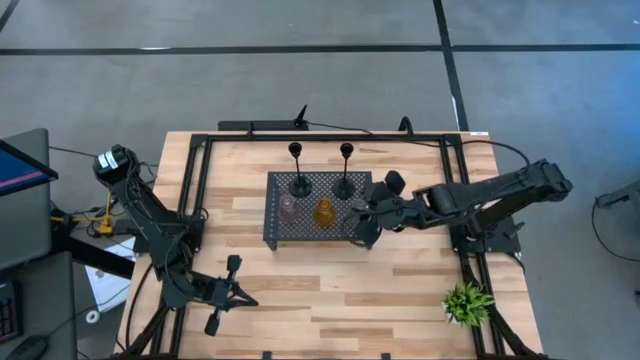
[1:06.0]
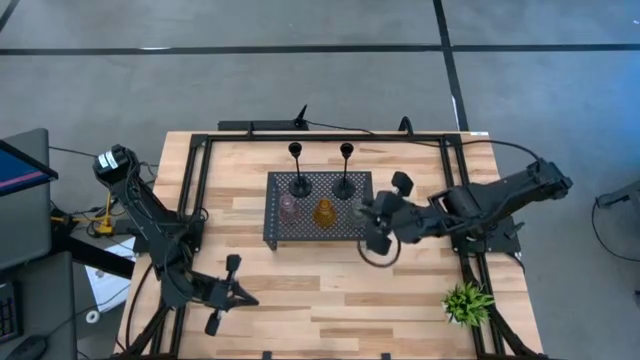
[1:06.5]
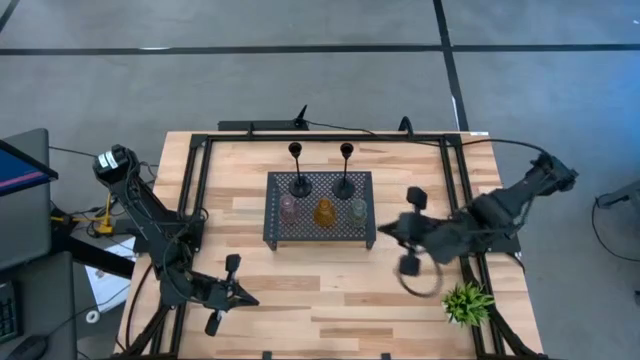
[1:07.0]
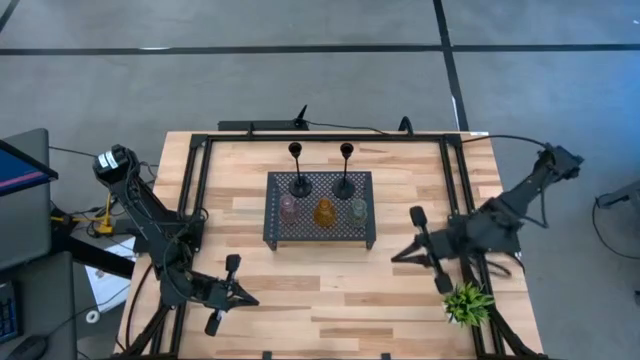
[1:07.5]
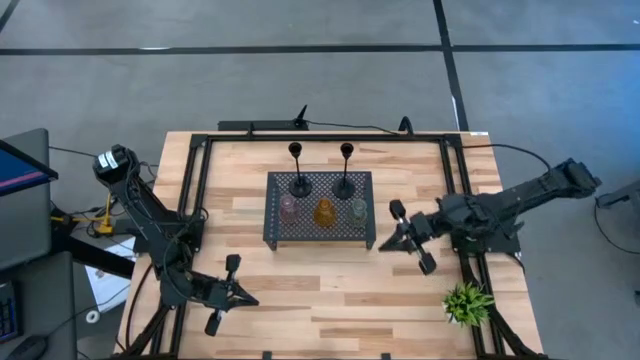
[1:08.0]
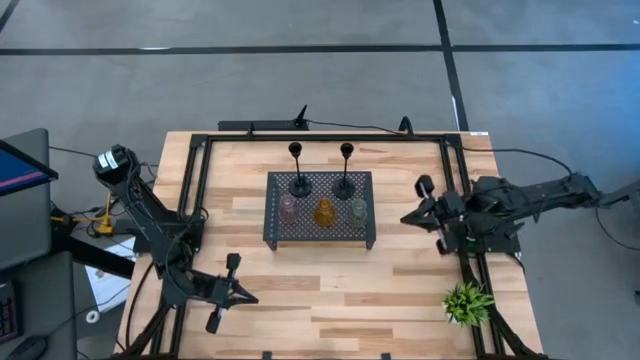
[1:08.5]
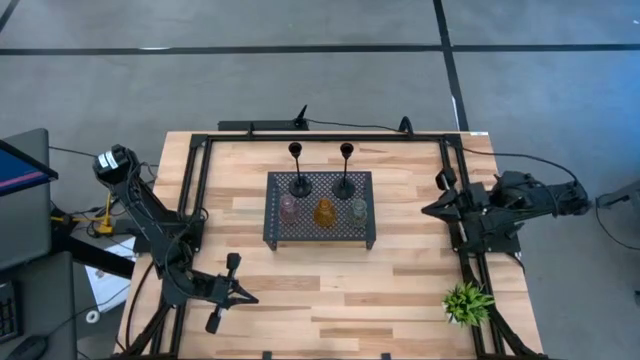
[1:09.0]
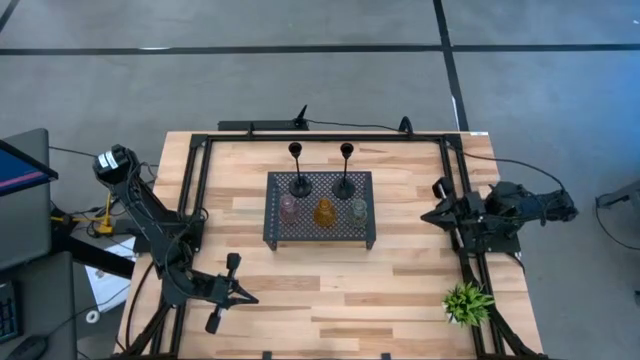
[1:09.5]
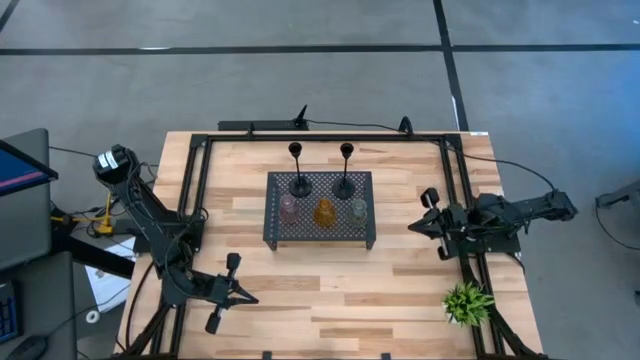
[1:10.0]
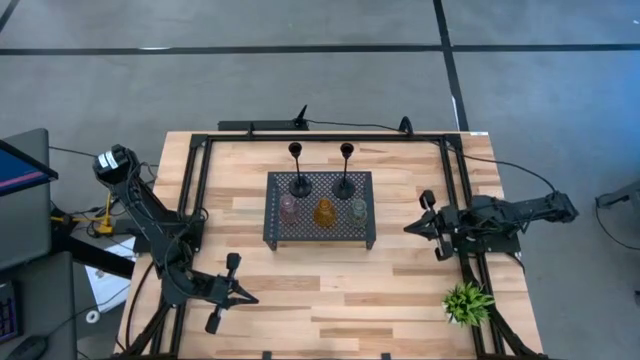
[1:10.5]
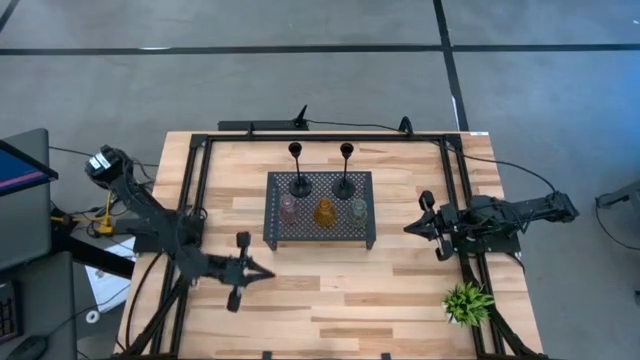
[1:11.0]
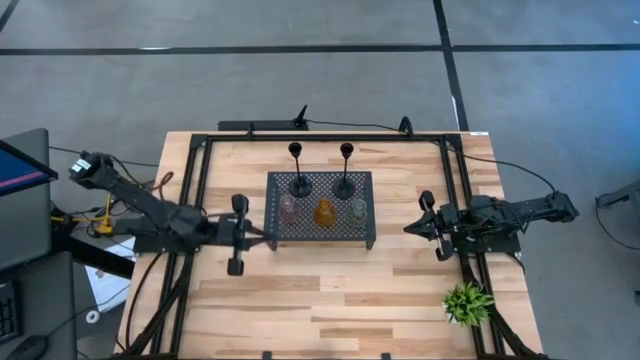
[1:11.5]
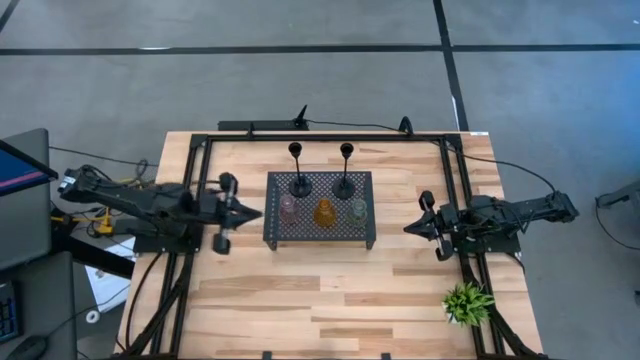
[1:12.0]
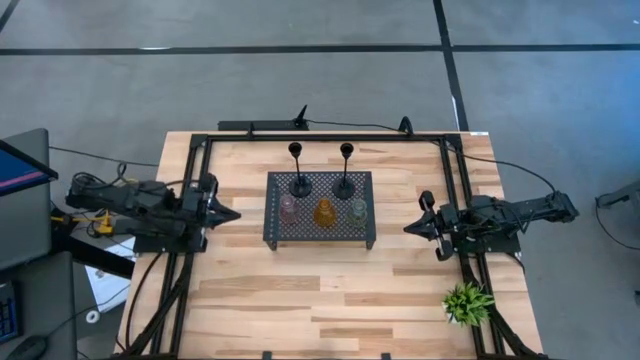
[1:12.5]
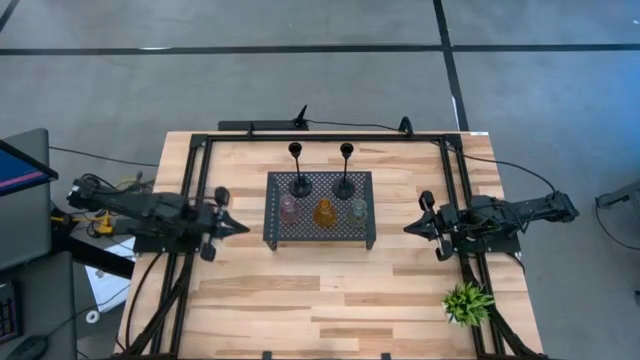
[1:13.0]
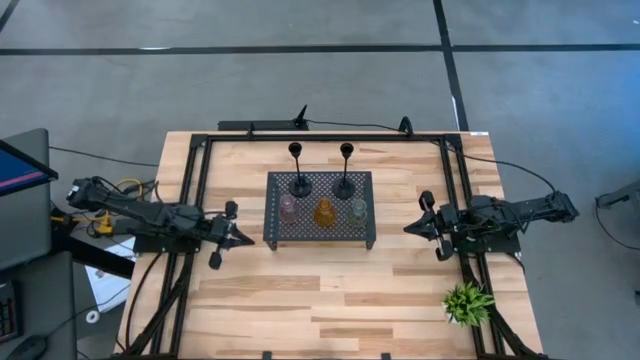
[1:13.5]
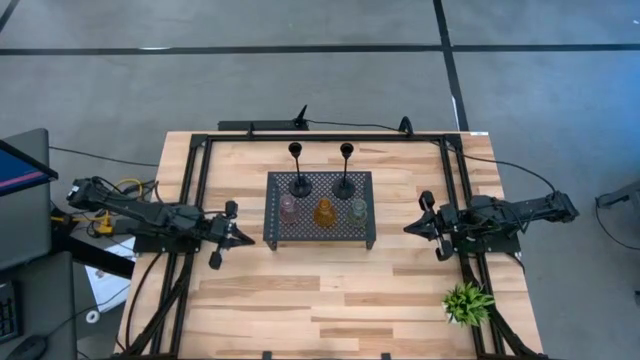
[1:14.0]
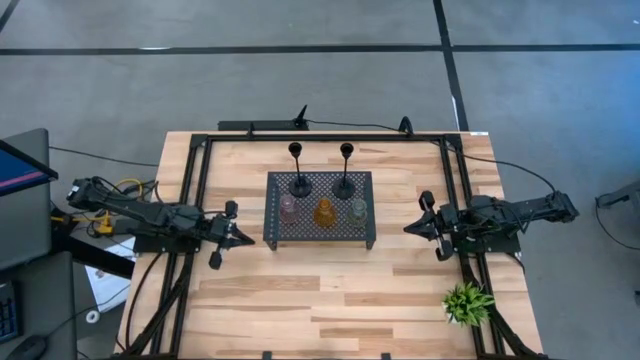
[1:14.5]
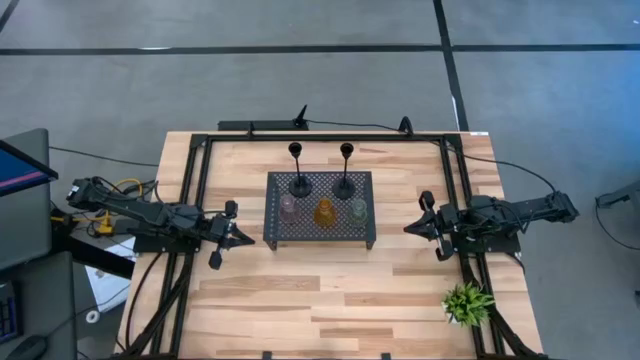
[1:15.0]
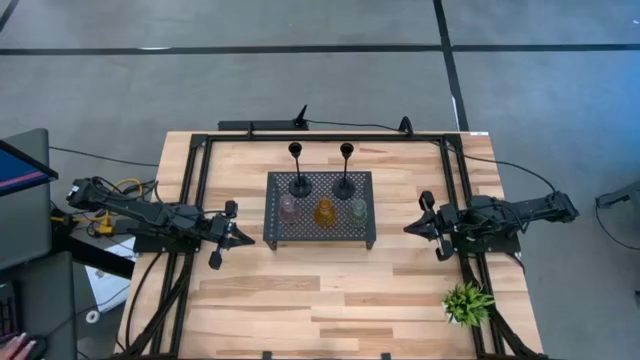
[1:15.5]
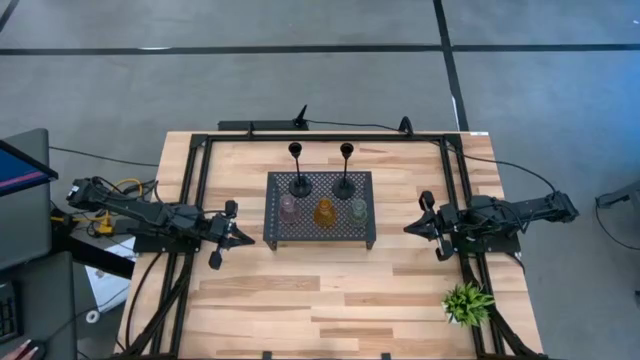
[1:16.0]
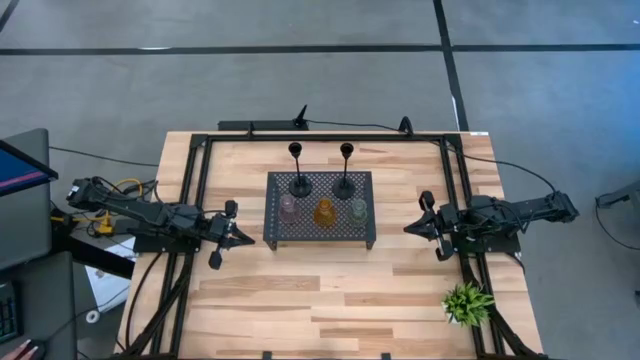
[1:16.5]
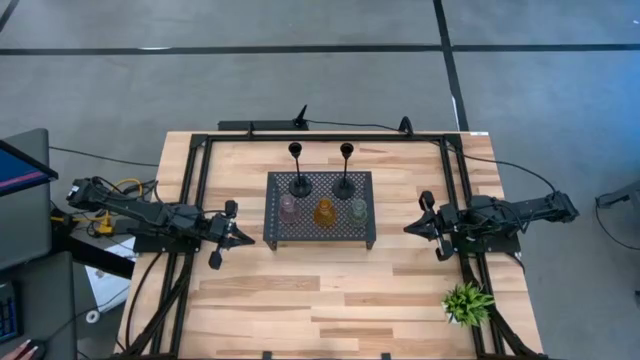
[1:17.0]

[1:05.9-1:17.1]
Task: Pick & Place candle stick holders
Return to Home Position

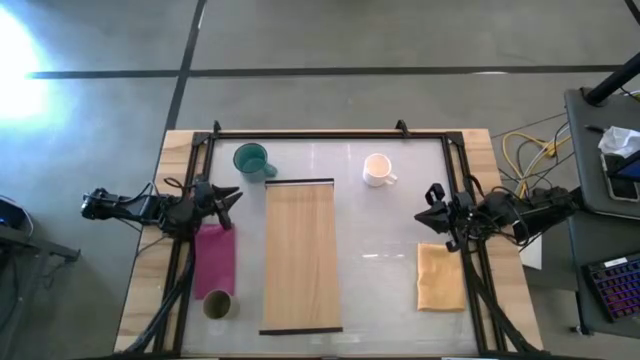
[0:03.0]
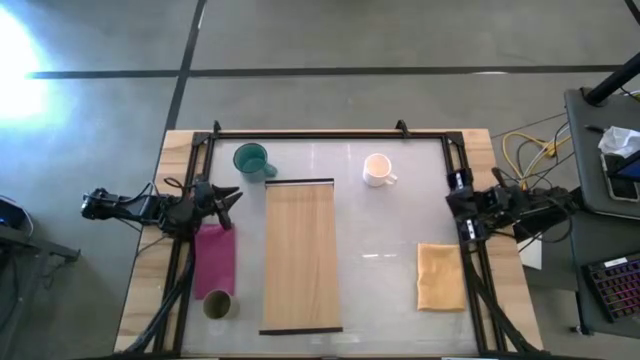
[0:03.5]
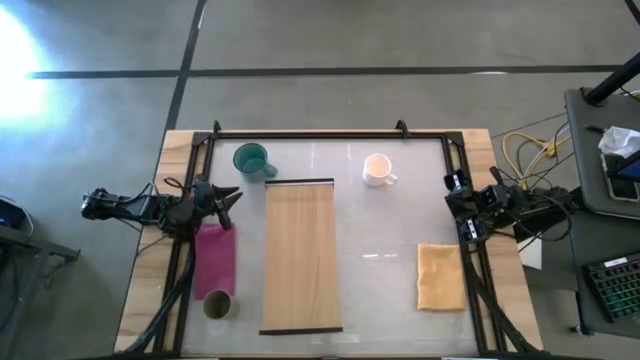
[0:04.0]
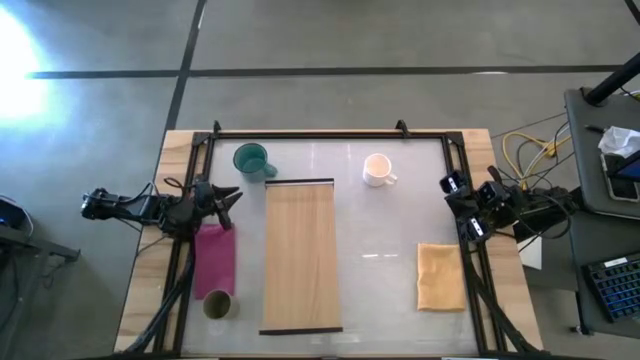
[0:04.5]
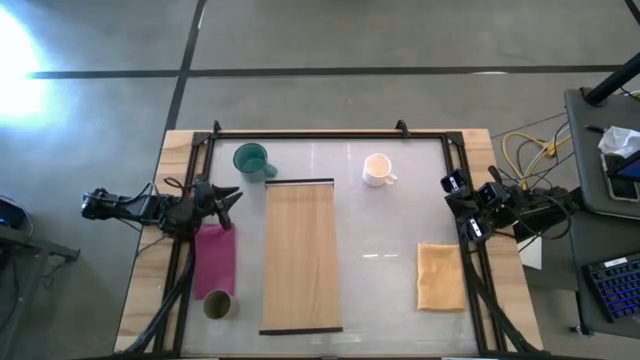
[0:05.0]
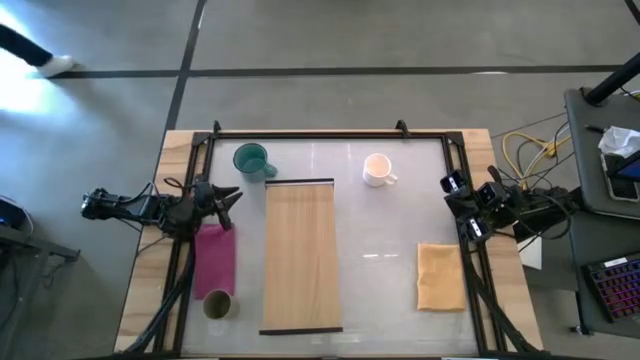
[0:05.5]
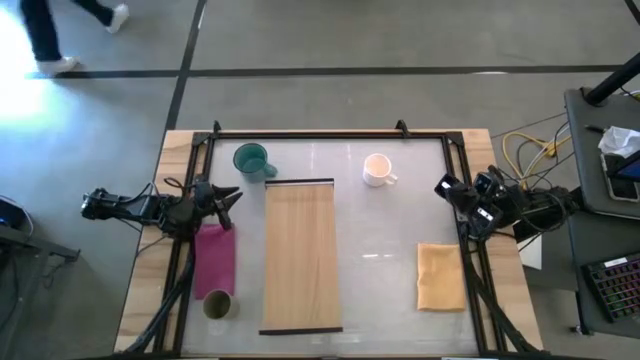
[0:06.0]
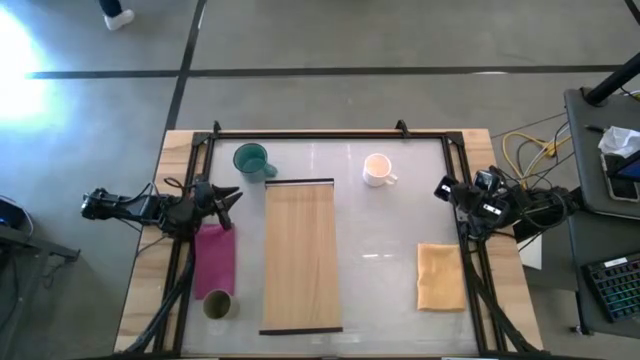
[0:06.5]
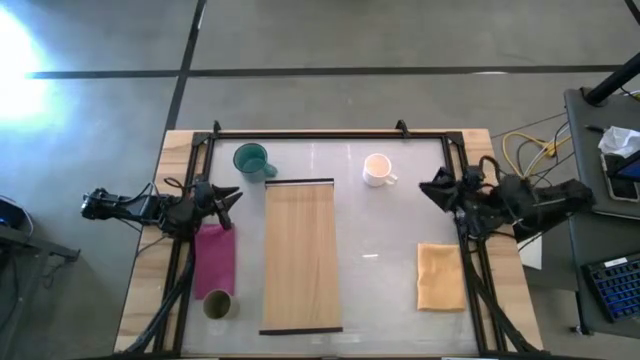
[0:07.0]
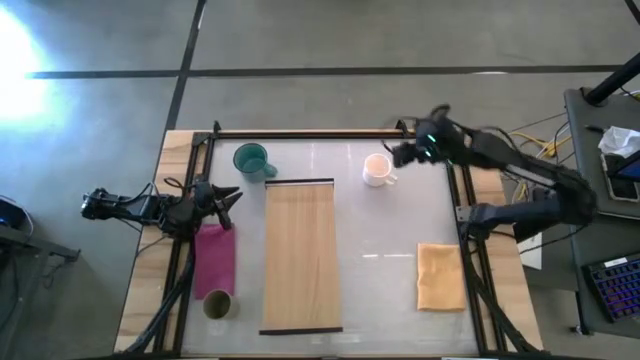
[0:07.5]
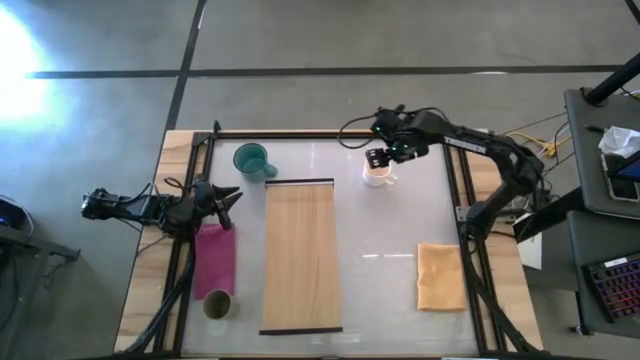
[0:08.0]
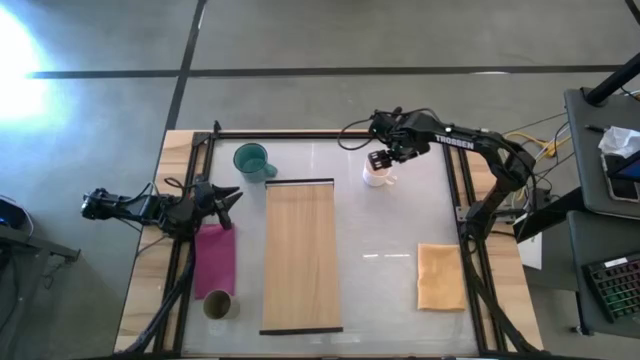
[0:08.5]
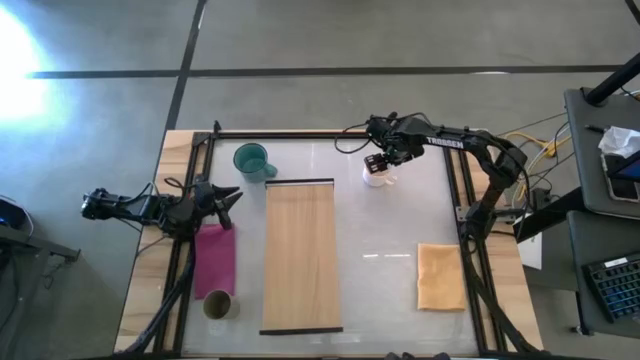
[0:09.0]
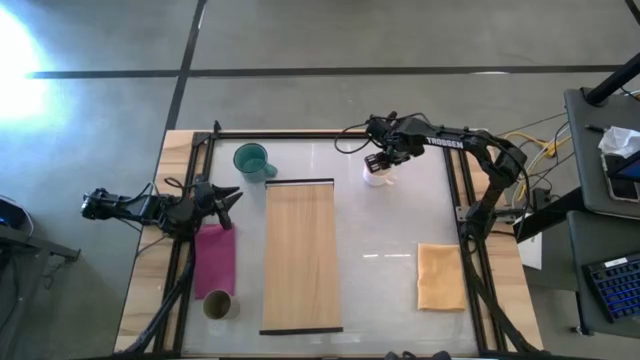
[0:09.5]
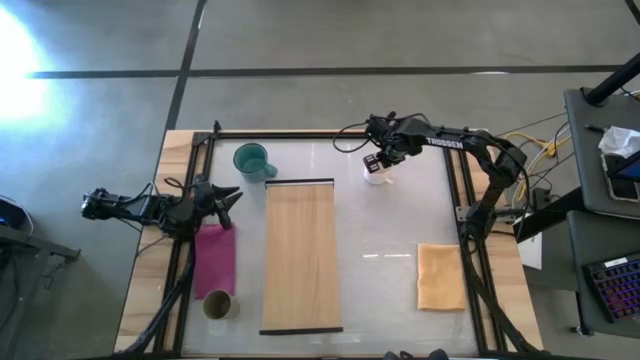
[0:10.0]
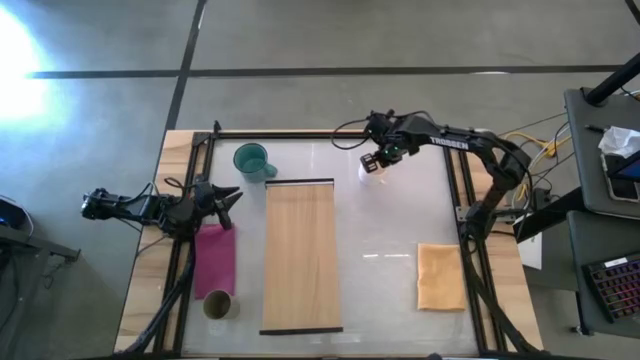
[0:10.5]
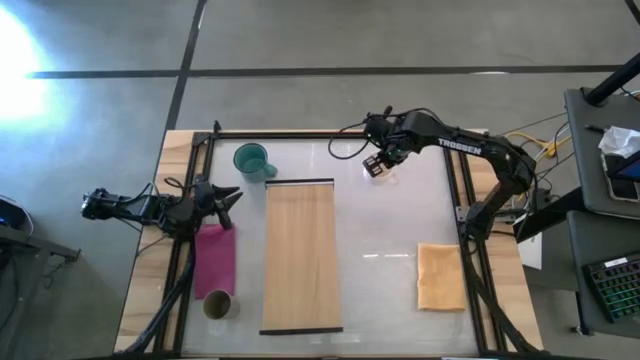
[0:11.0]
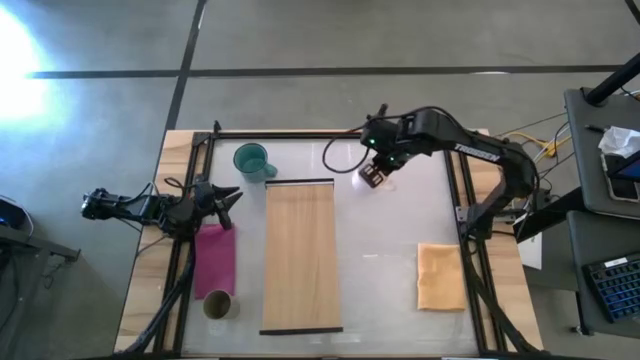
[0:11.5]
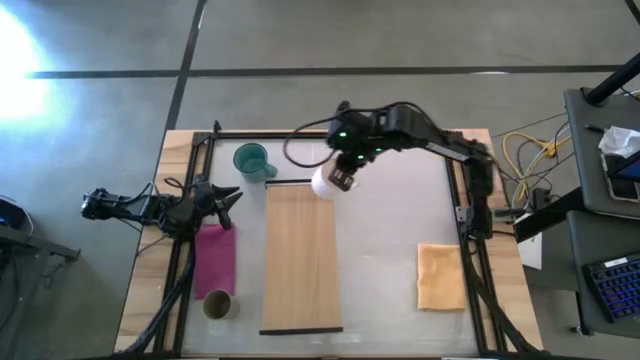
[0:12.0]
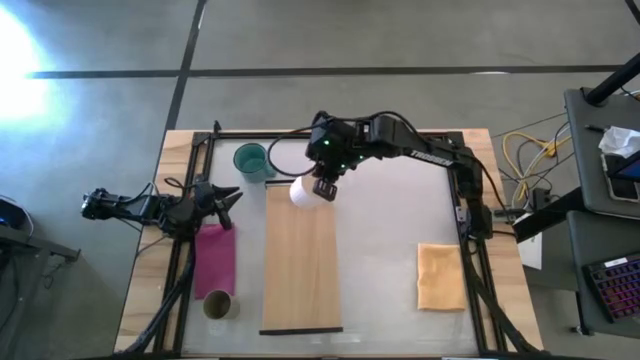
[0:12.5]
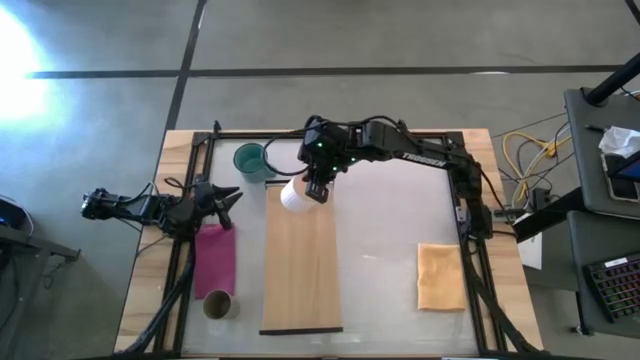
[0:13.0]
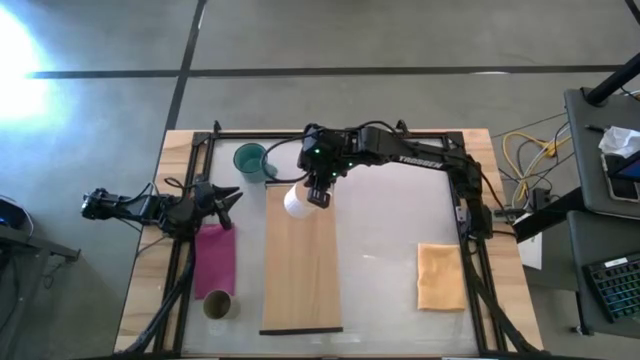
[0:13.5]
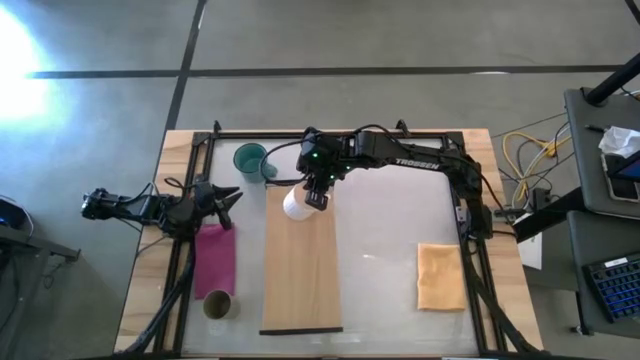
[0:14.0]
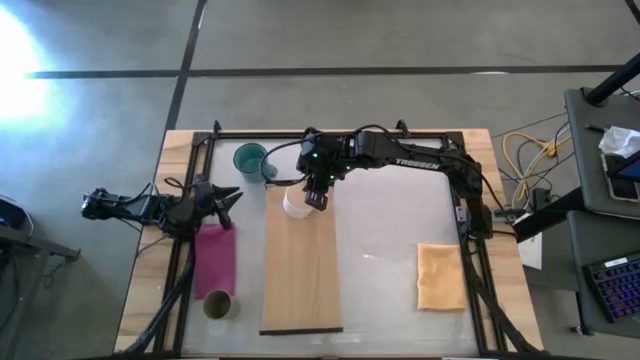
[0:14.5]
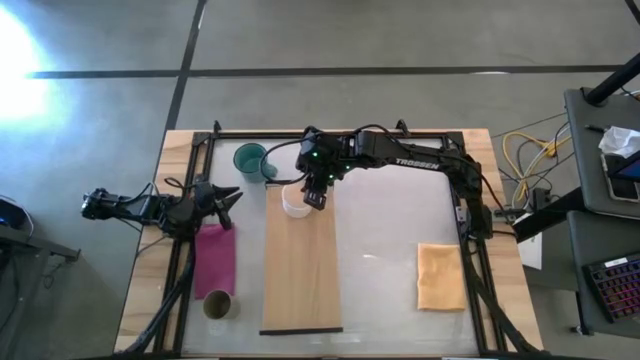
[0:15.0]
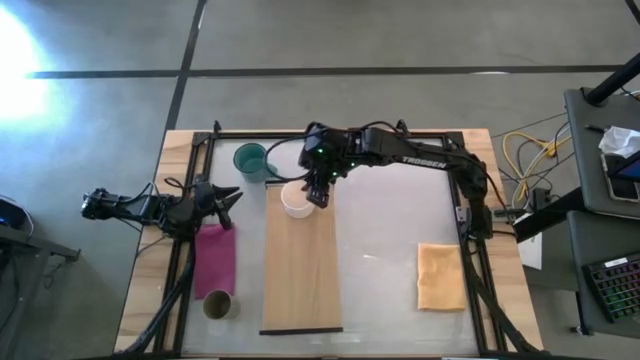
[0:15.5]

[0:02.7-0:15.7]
Task: Stack small to large cups/mugs on shelf
Put the white mug on the shelf
